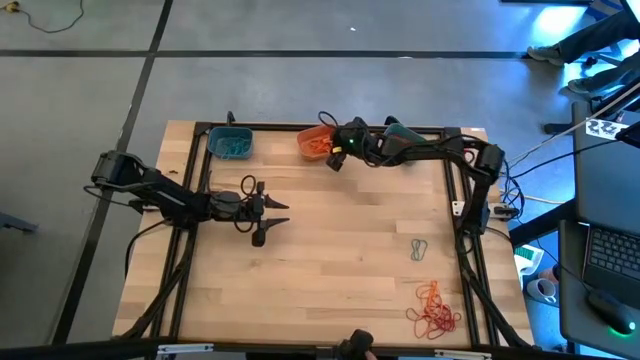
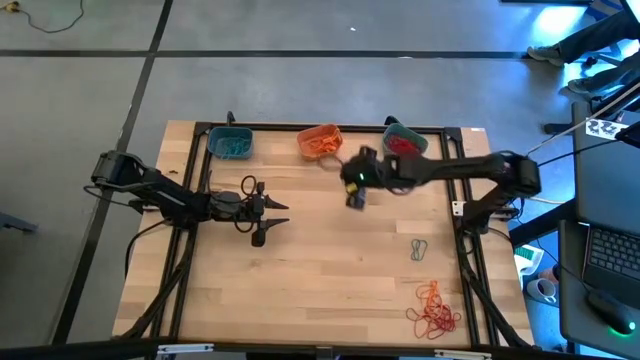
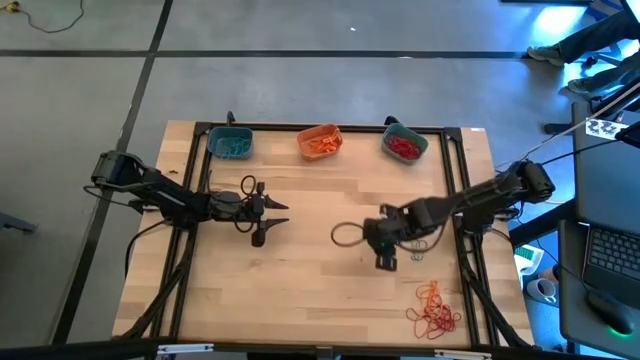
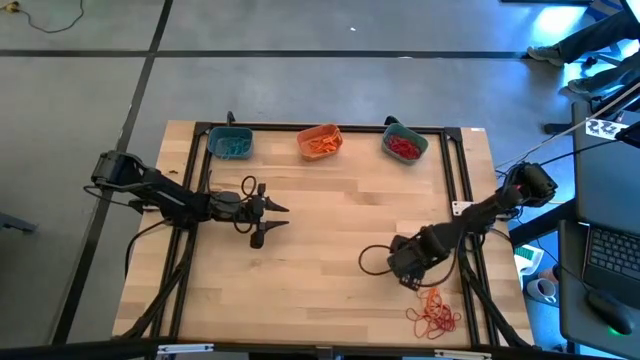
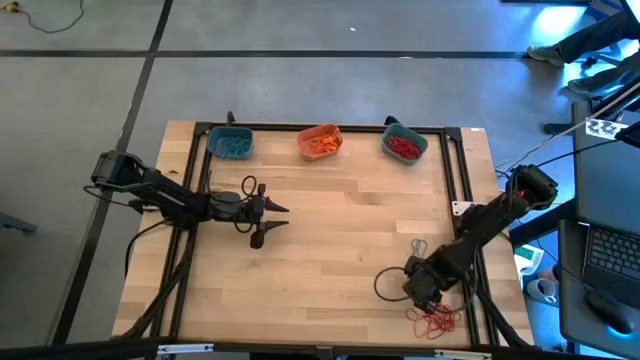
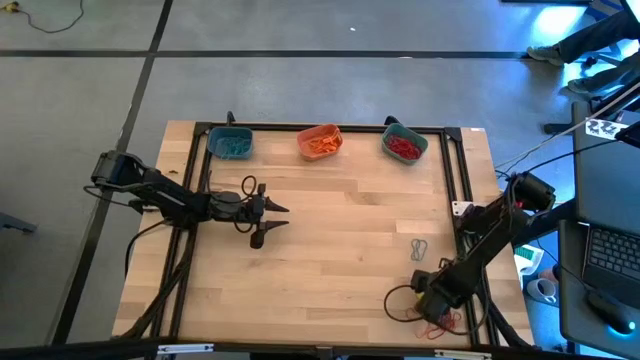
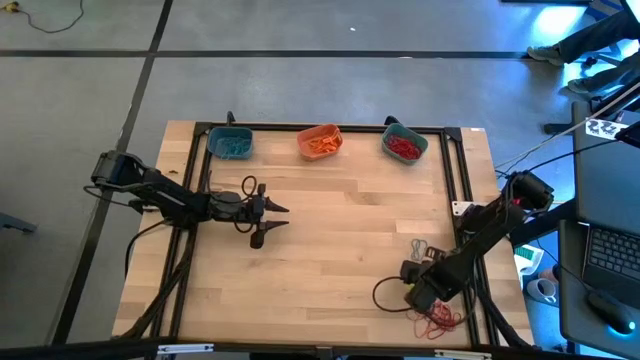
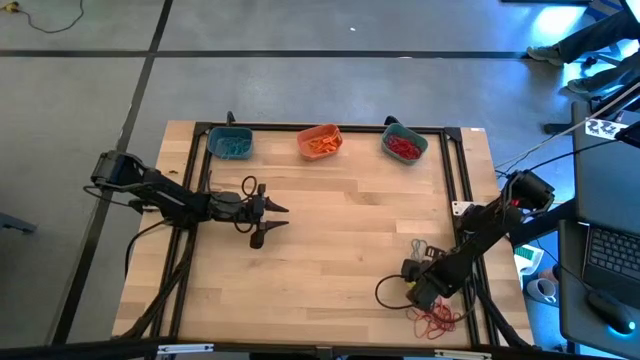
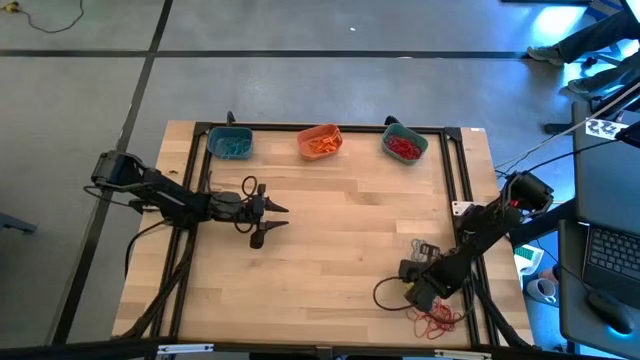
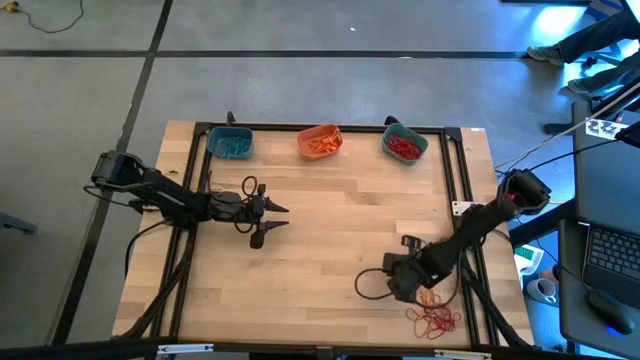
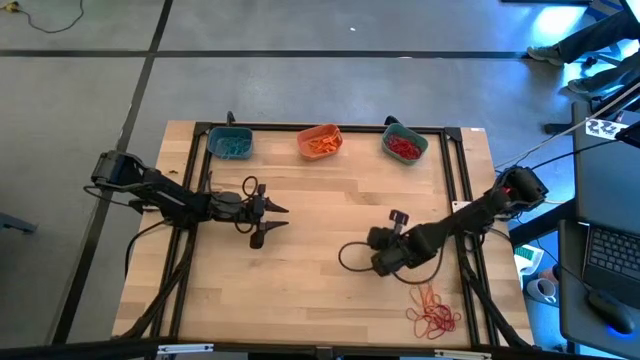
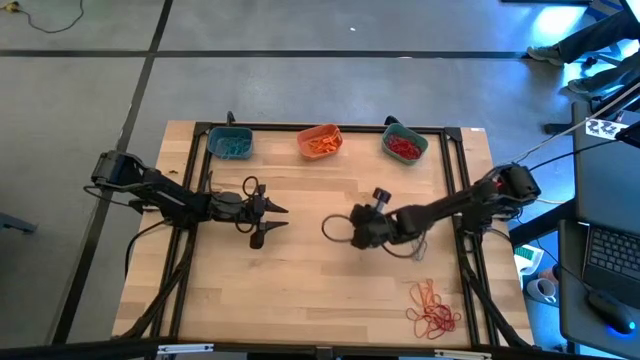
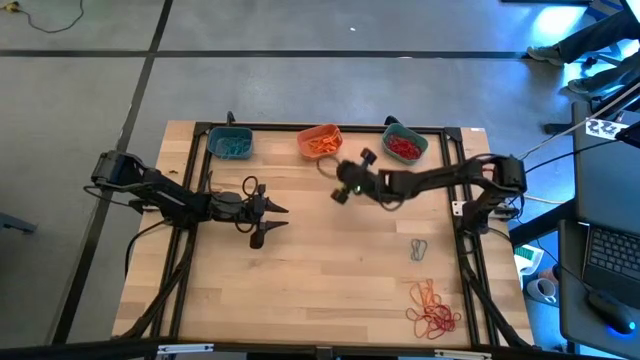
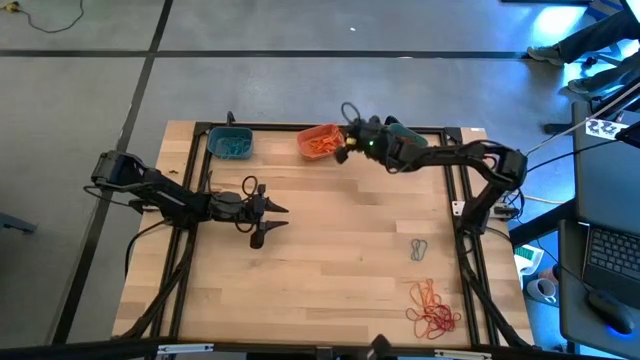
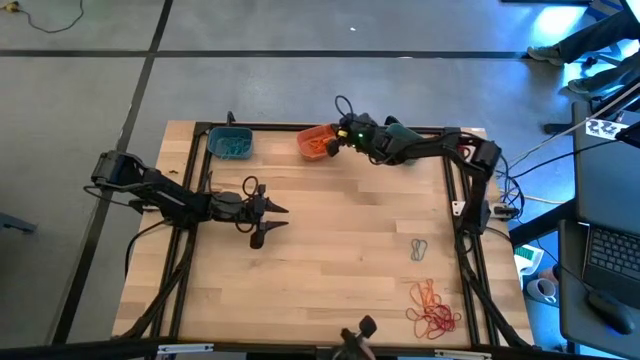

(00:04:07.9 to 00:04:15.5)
Task: Sort rubber bands into baskets
Put the orange rubber band into the orange bin

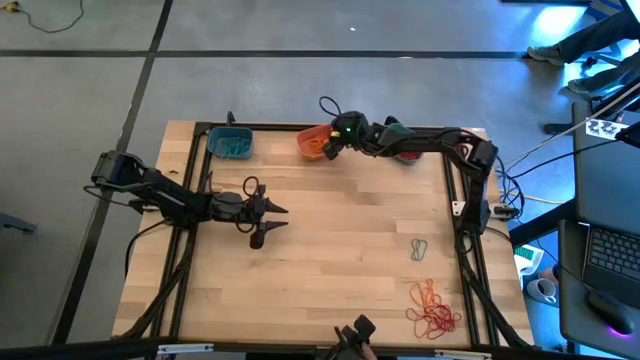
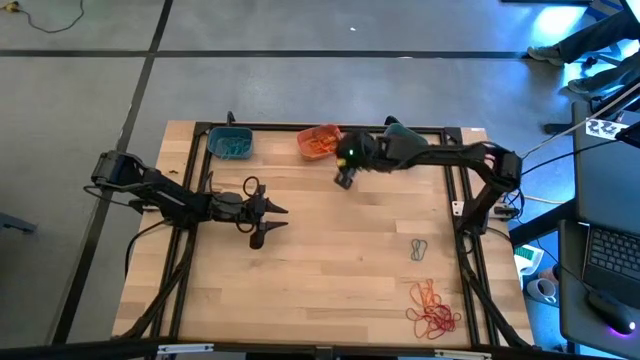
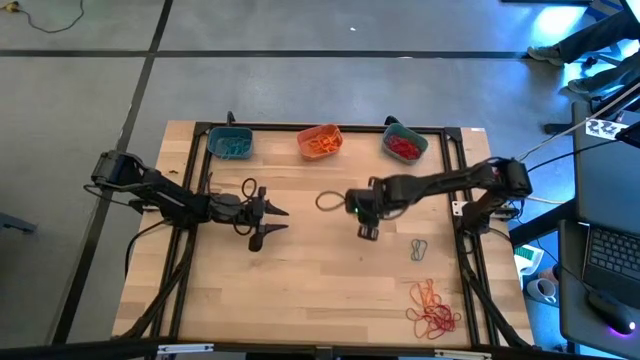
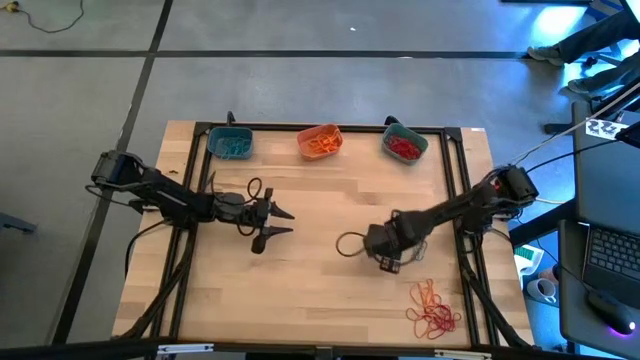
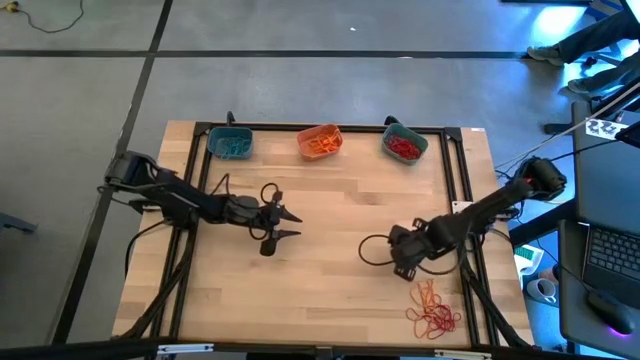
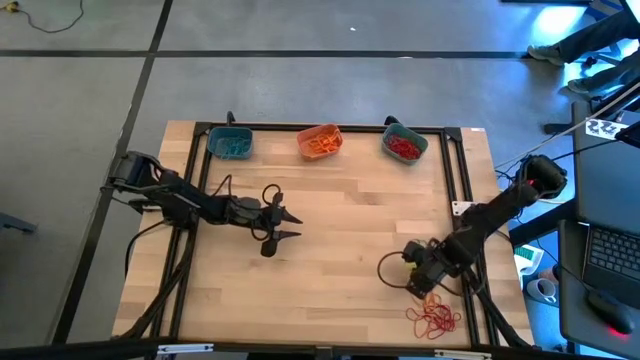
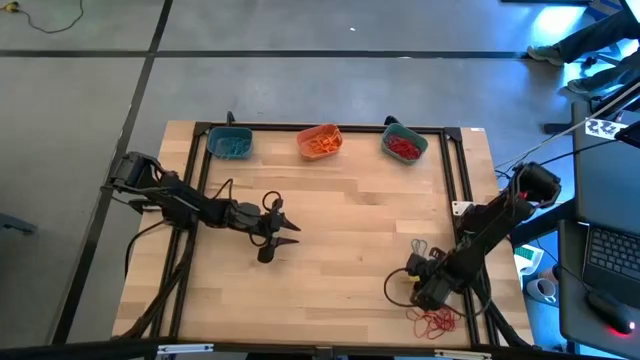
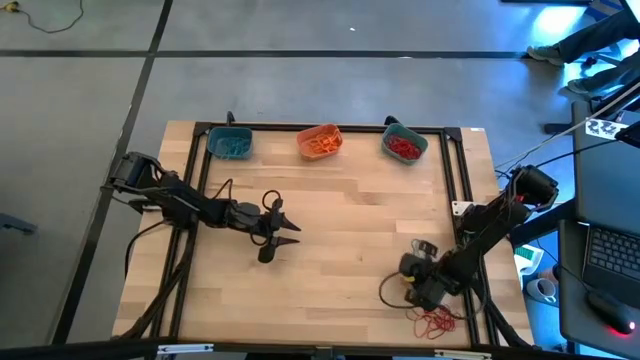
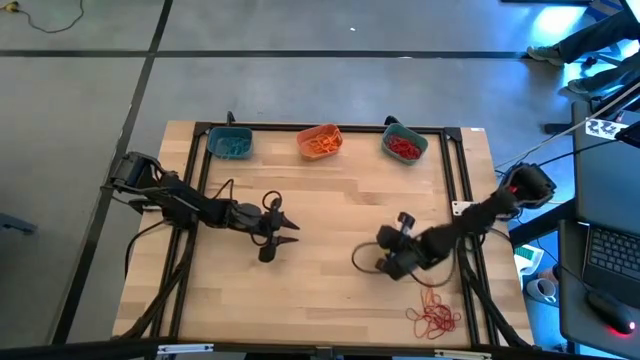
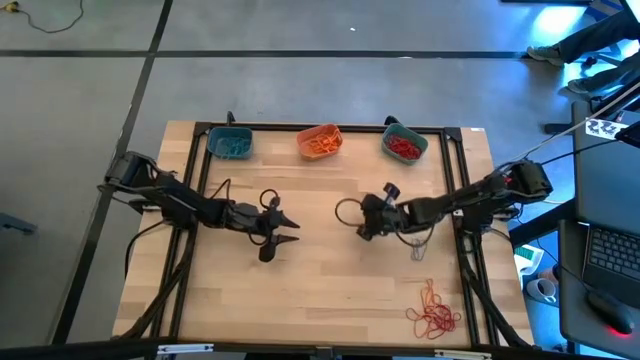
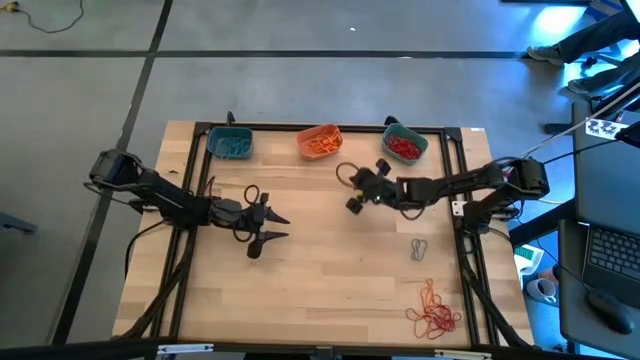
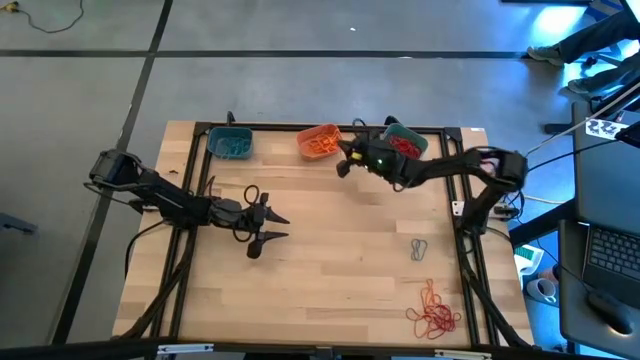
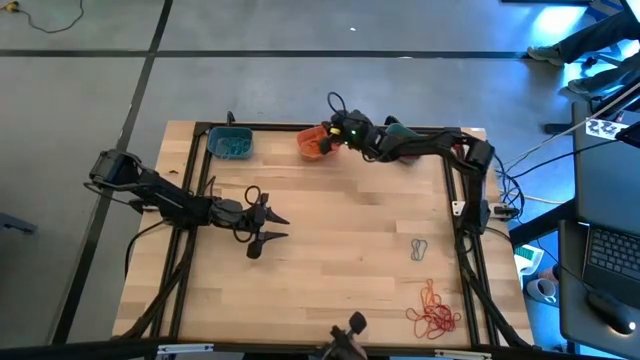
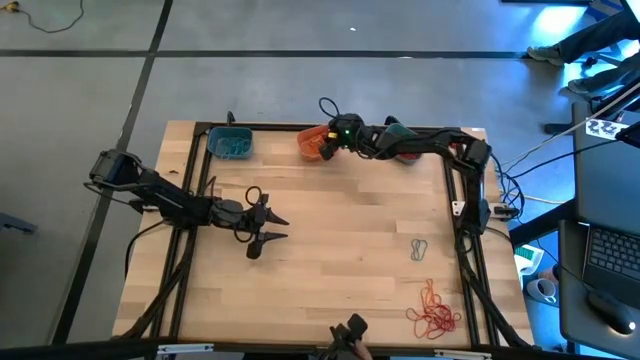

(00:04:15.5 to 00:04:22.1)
Put the orange rubber band into the orange bin

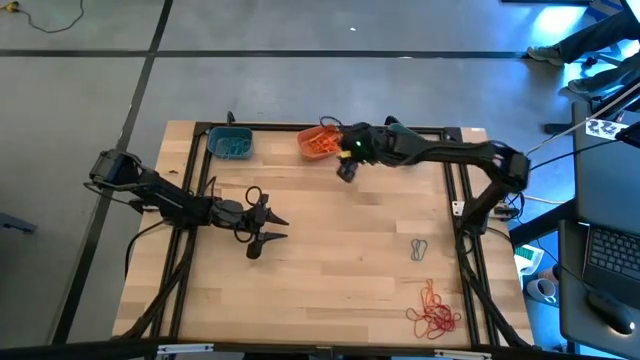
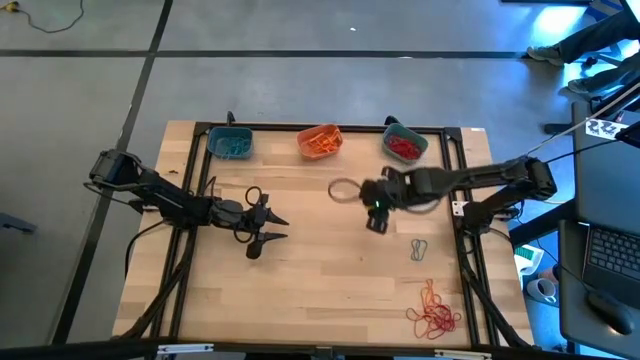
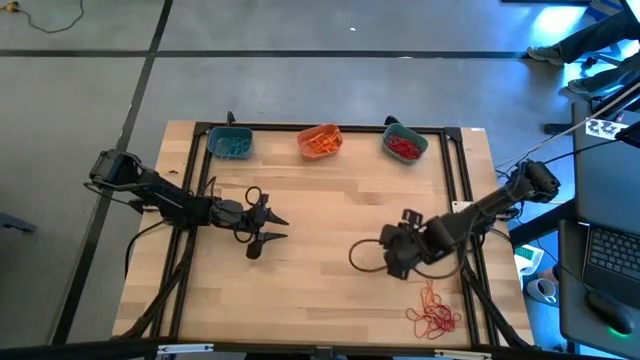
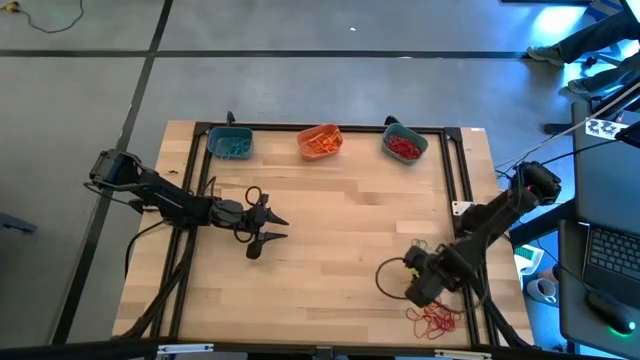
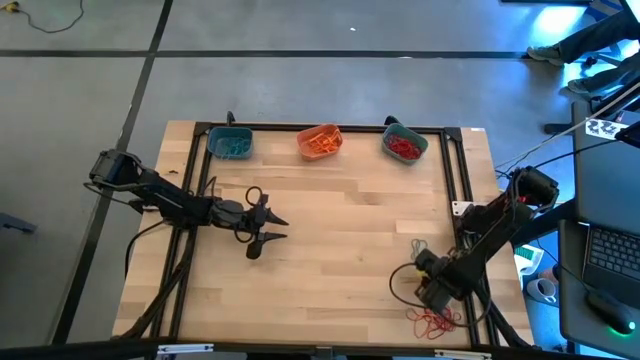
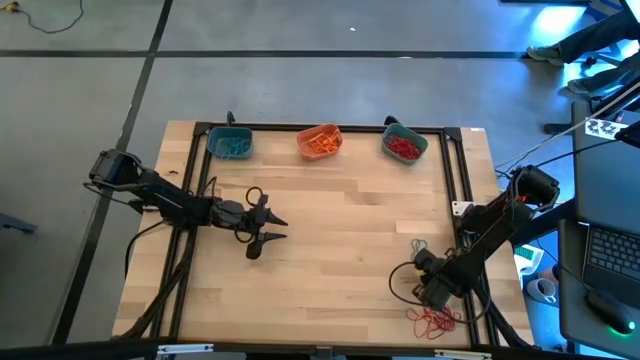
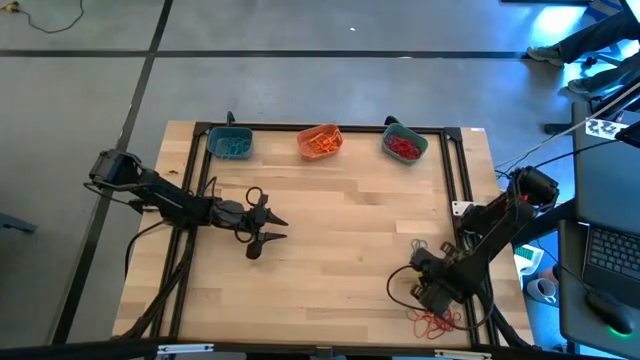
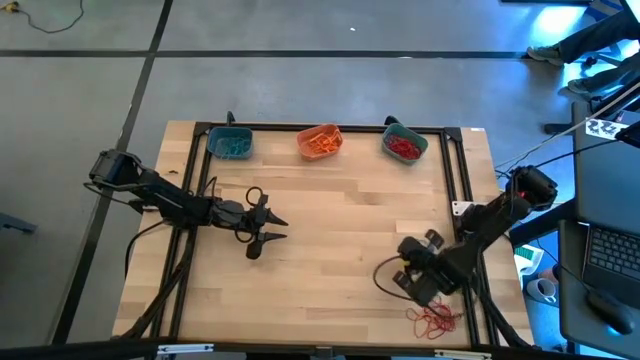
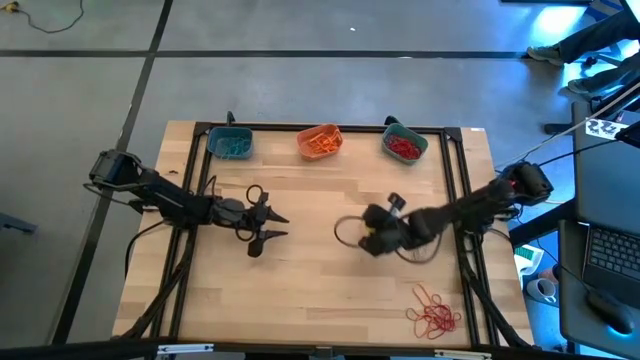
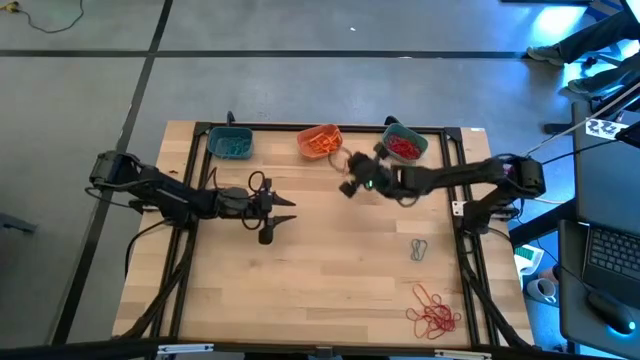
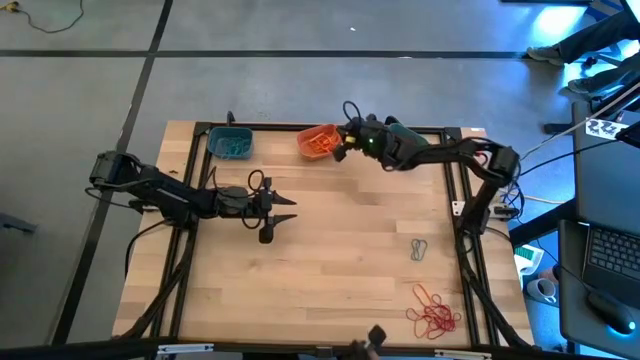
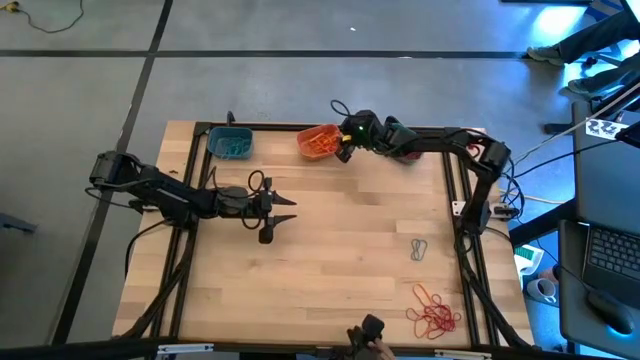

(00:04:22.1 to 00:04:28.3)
Put the orange rubber band into the orange bin
